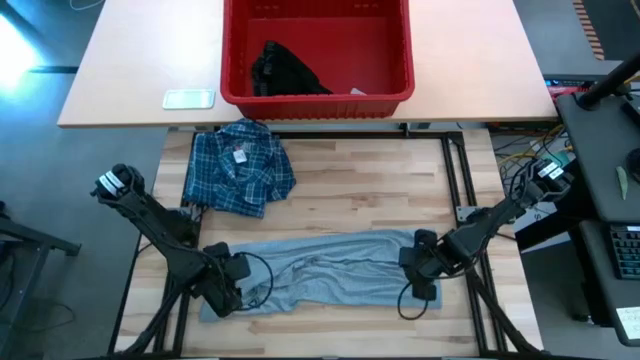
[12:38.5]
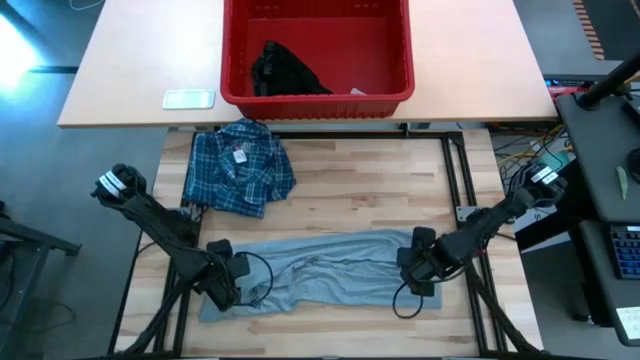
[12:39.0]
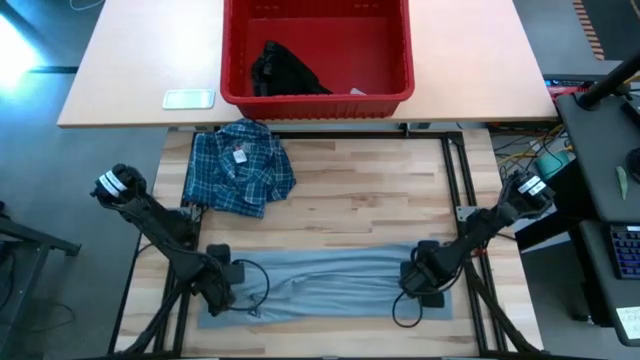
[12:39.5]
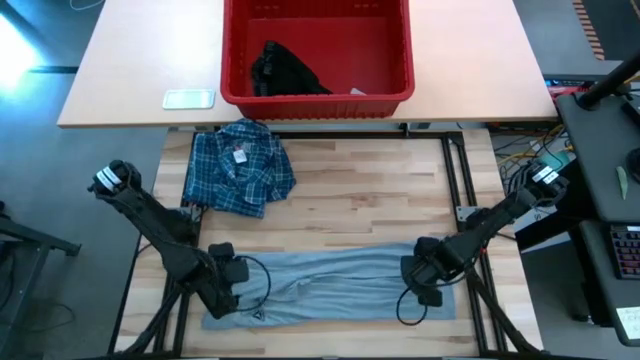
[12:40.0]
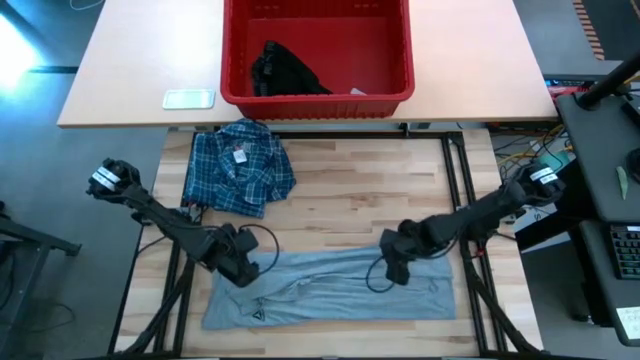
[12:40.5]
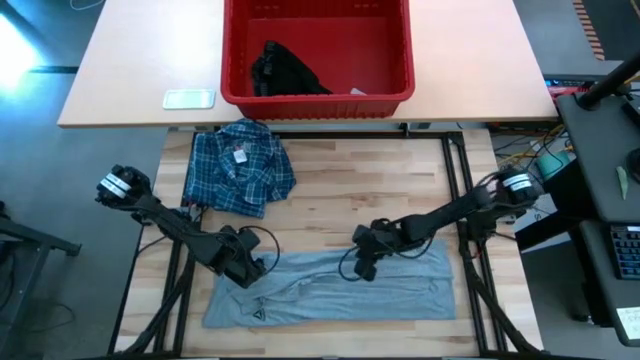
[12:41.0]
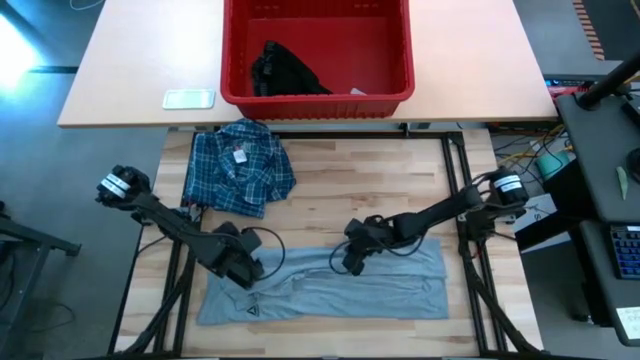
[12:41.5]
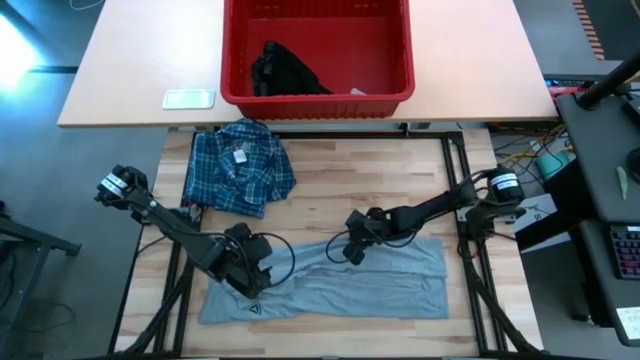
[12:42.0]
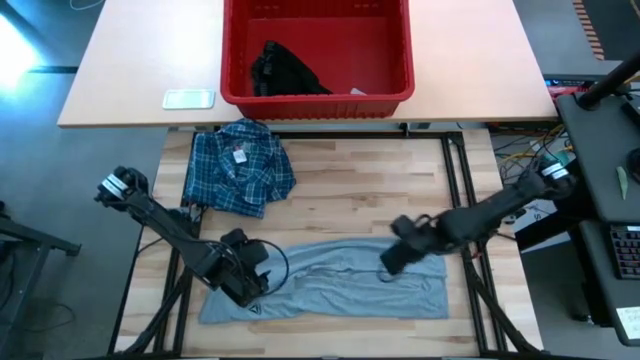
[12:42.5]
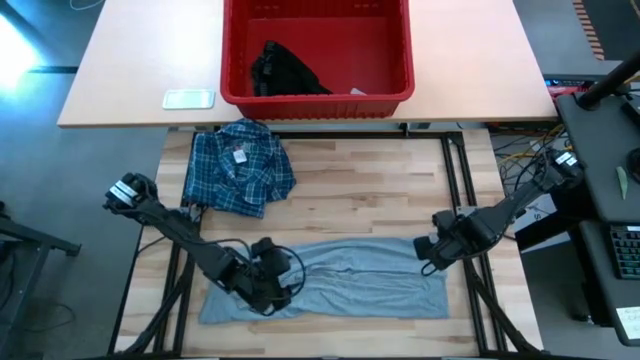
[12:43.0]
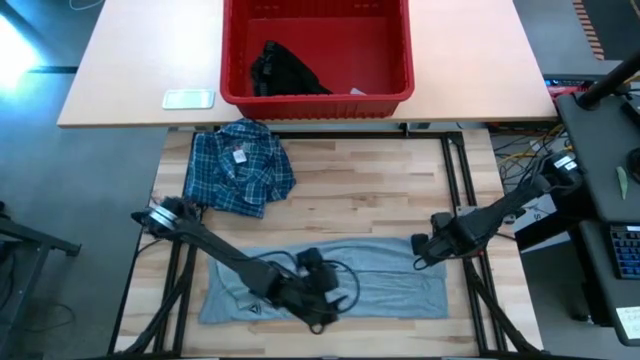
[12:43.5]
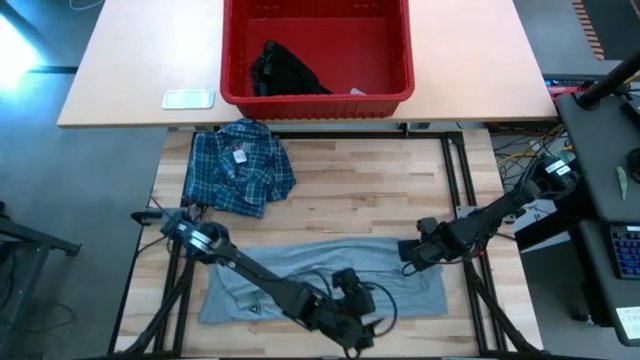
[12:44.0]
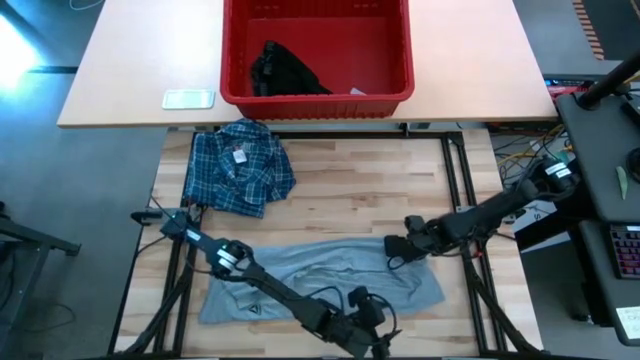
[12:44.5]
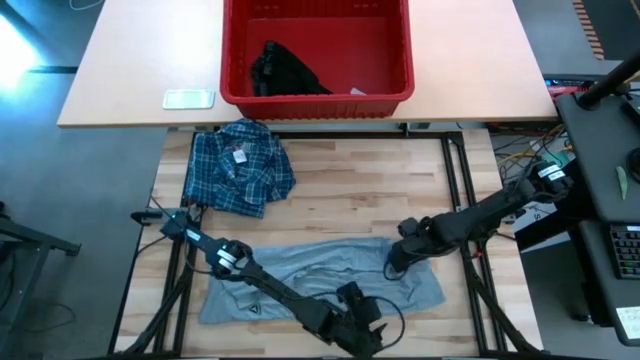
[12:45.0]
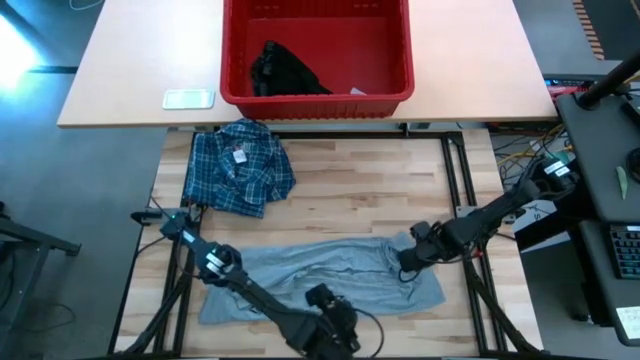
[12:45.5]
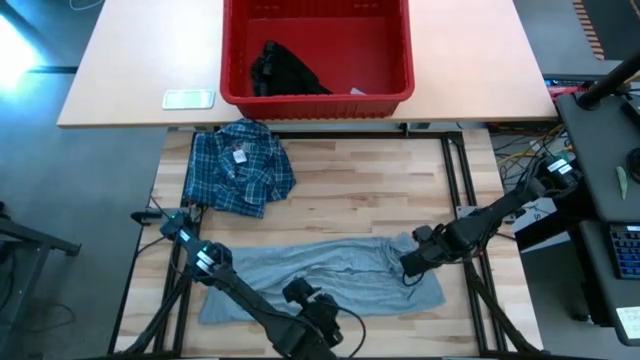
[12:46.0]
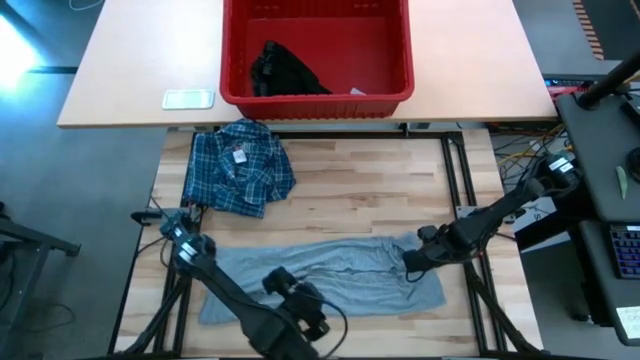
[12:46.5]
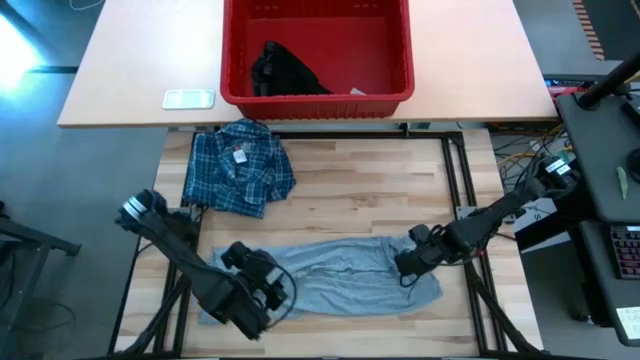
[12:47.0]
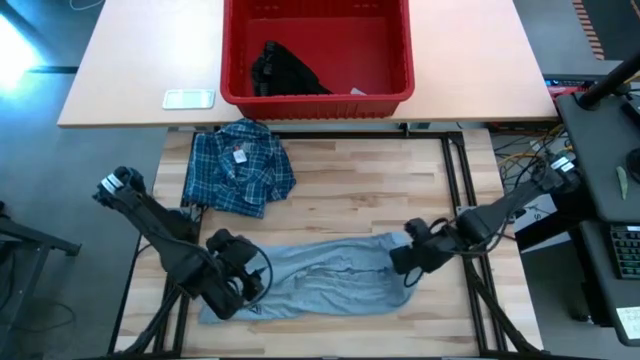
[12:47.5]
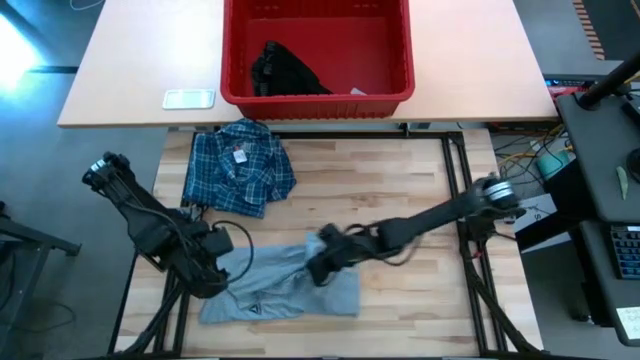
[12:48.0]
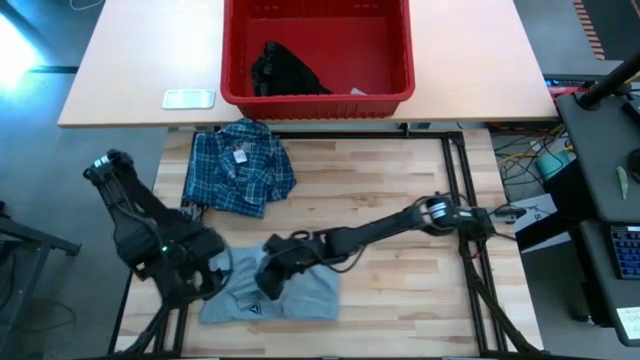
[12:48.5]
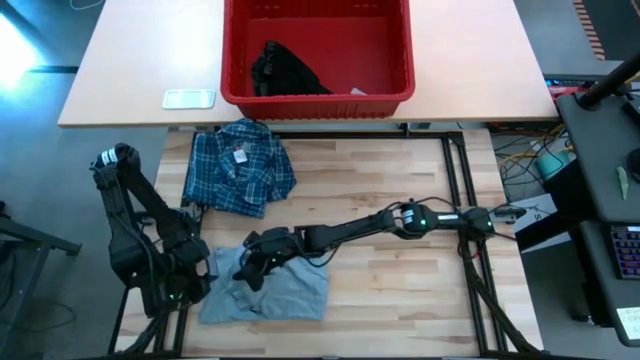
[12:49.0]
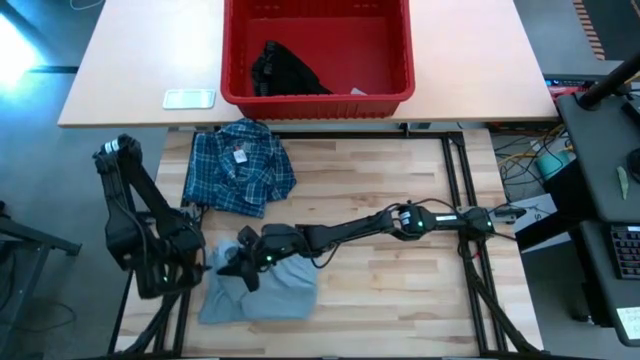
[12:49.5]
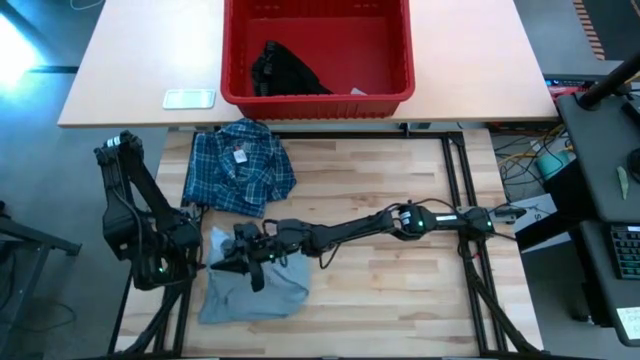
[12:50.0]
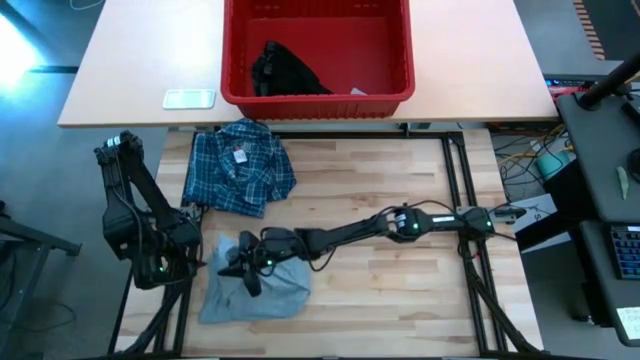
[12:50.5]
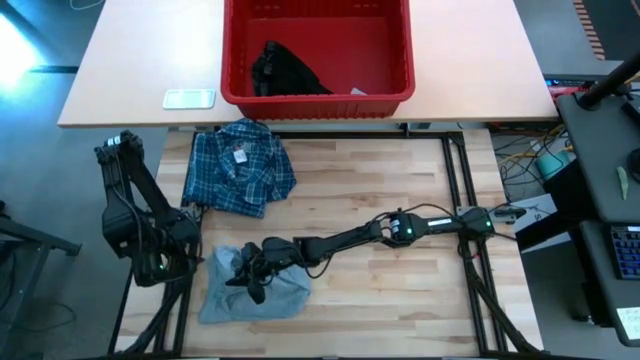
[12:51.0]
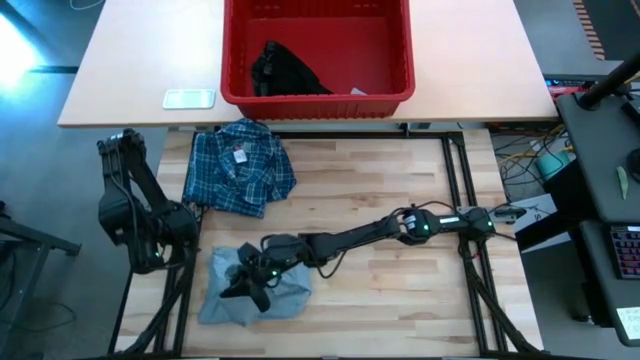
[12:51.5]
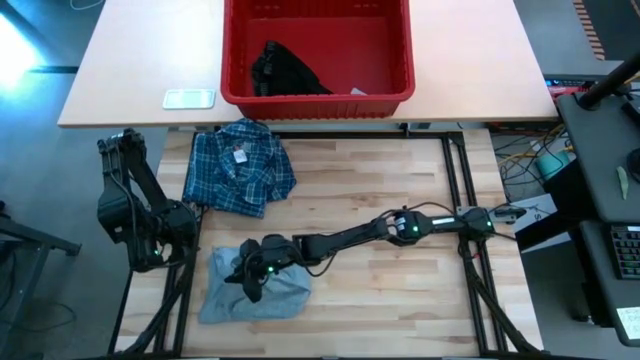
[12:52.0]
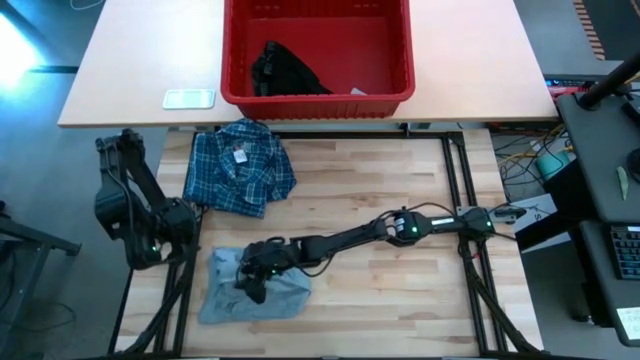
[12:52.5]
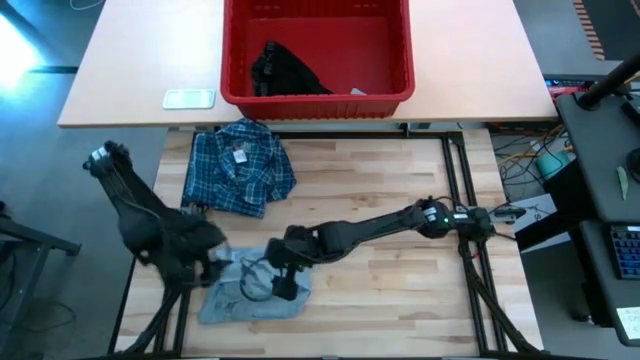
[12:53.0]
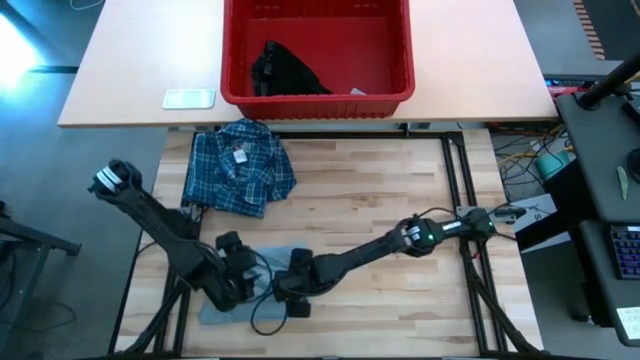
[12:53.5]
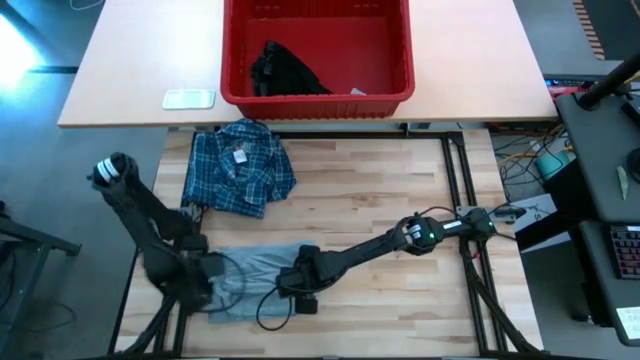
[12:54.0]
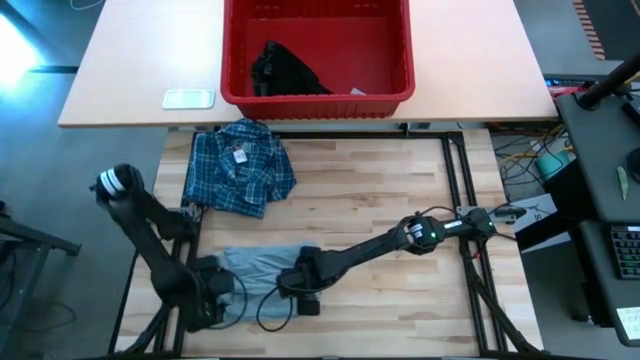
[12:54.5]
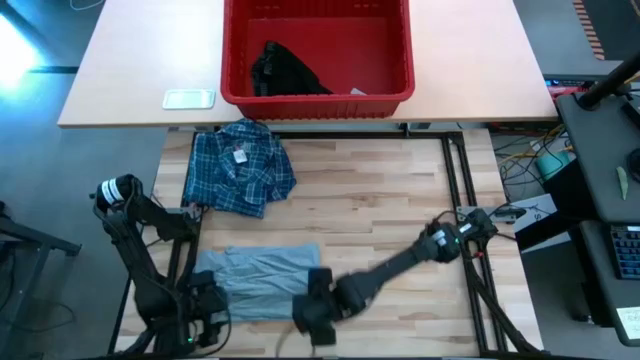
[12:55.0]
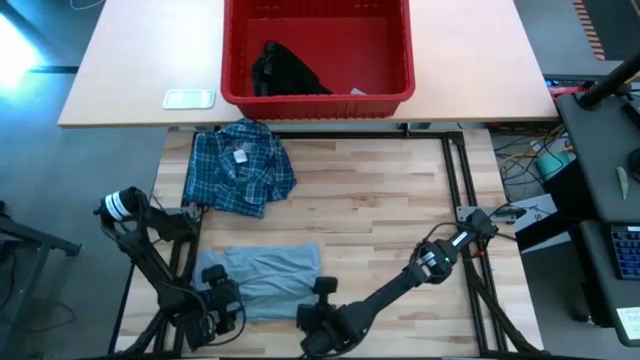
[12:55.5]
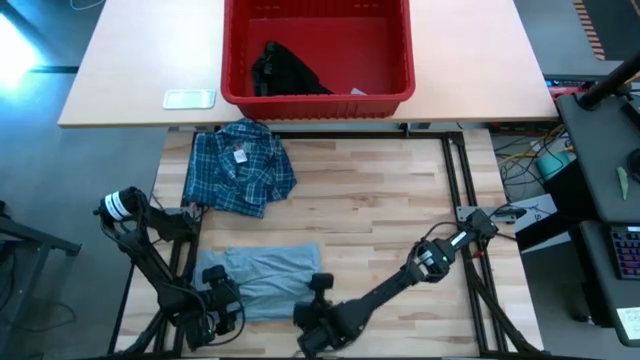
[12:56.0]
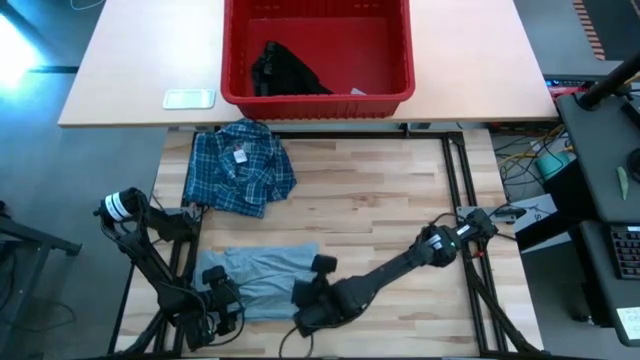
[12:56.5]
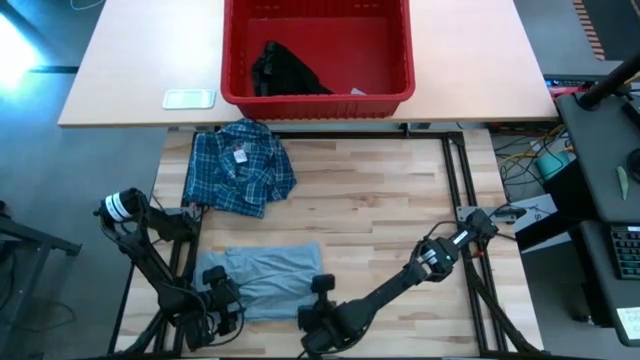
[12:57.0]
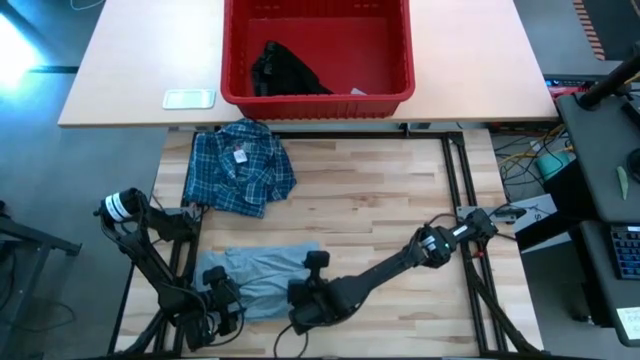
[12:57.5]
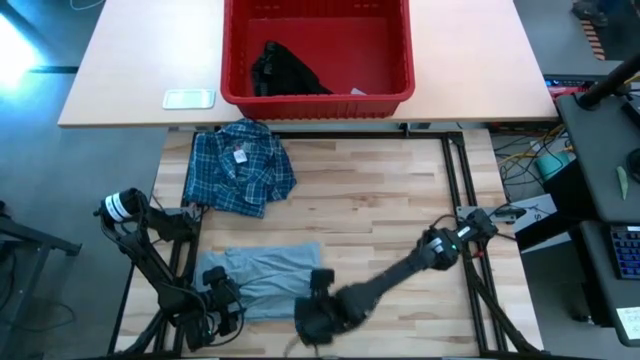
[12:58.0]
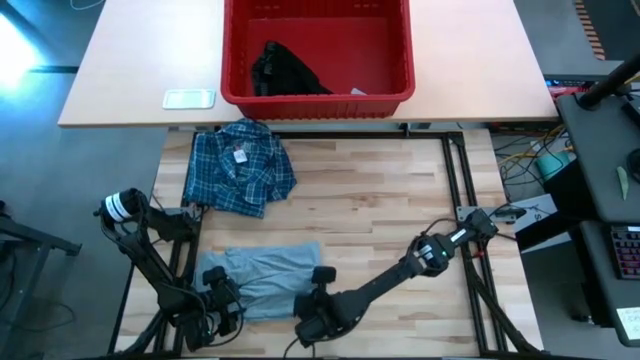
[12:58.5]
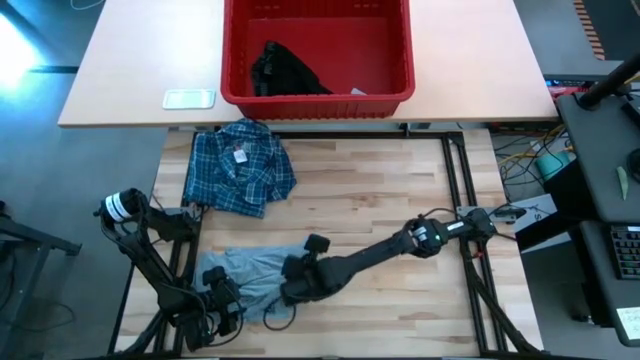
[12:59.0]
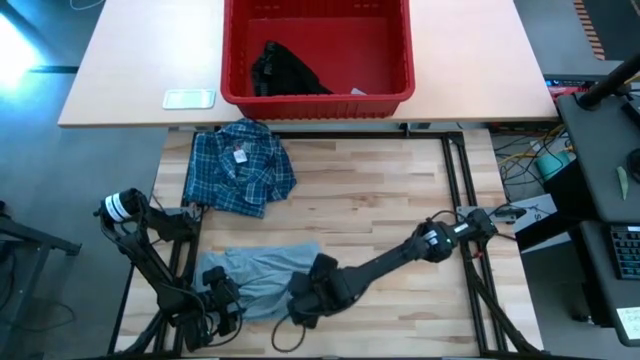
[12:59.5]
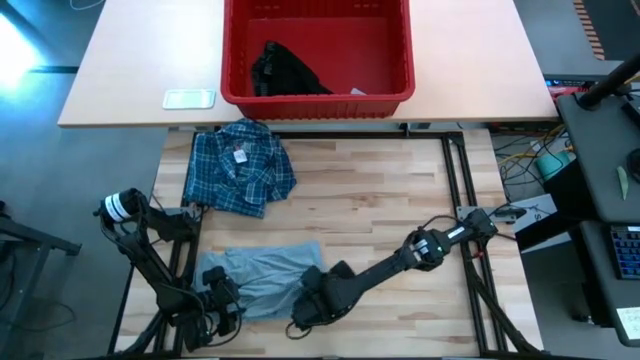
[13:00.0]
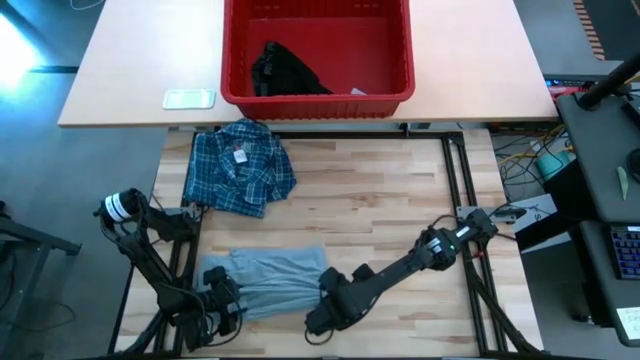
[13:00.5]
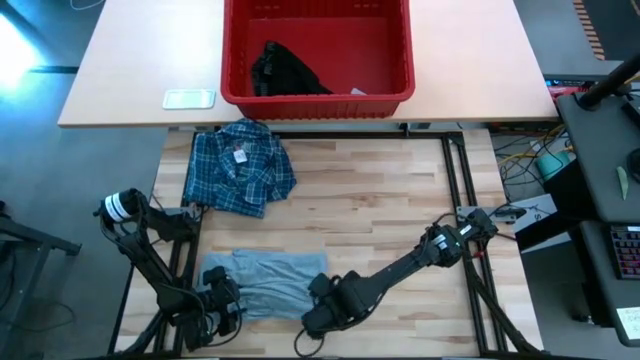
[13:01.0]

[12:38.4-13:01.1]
Task: Fold Laundry from Bin
Fold the gray shirt
